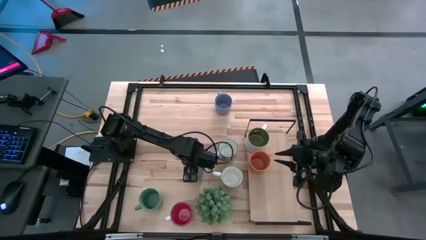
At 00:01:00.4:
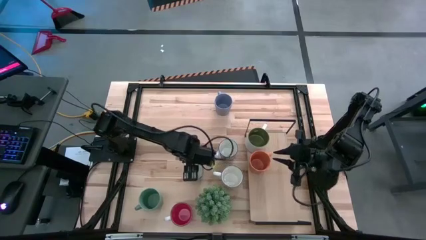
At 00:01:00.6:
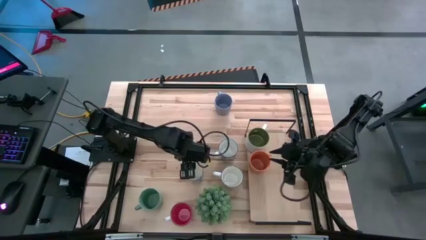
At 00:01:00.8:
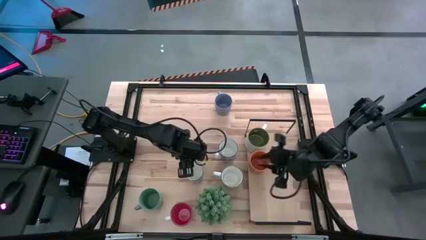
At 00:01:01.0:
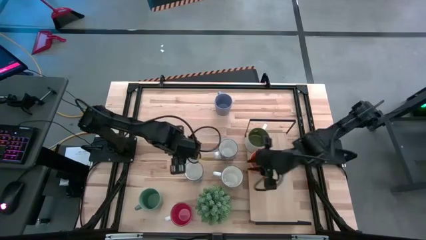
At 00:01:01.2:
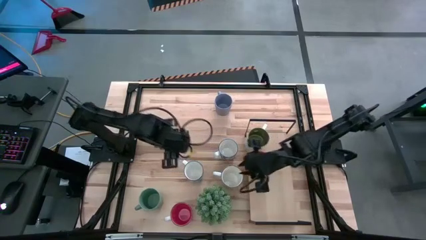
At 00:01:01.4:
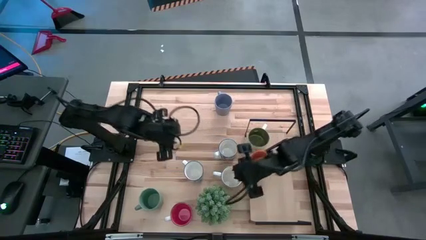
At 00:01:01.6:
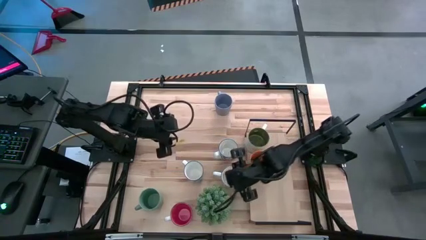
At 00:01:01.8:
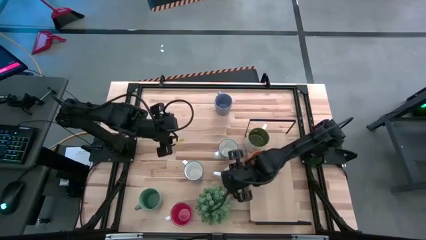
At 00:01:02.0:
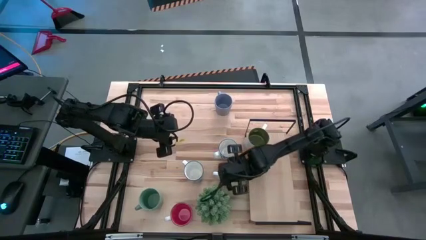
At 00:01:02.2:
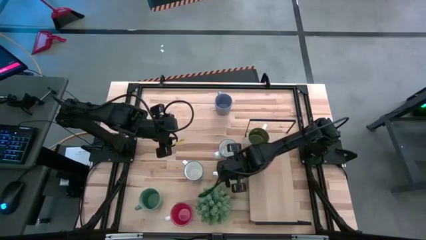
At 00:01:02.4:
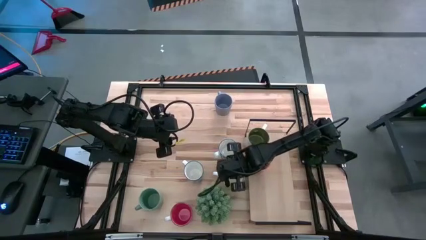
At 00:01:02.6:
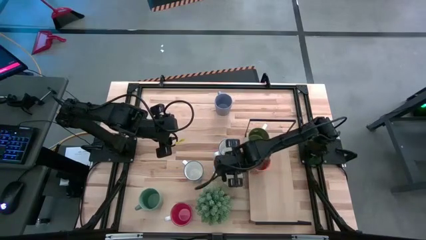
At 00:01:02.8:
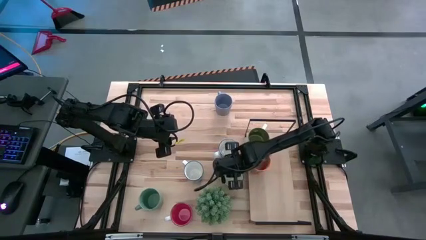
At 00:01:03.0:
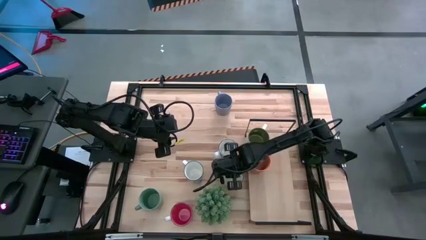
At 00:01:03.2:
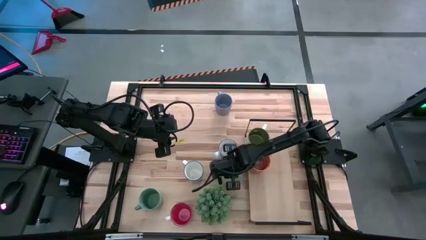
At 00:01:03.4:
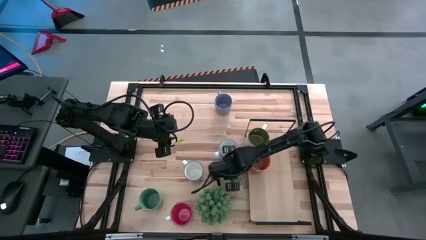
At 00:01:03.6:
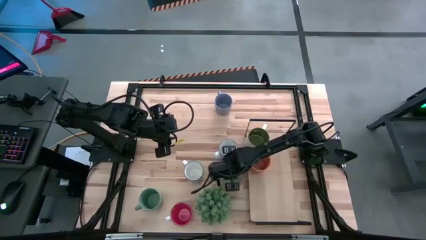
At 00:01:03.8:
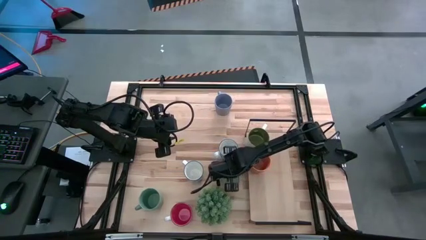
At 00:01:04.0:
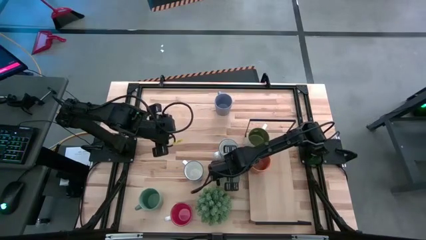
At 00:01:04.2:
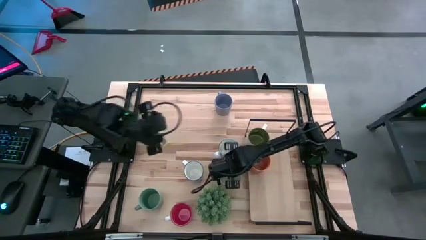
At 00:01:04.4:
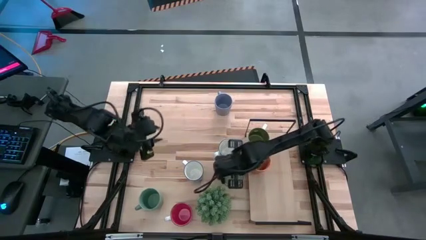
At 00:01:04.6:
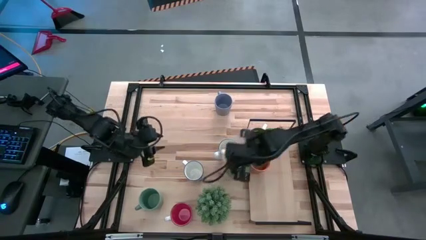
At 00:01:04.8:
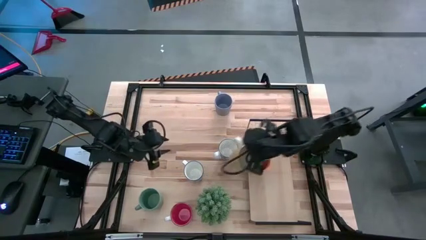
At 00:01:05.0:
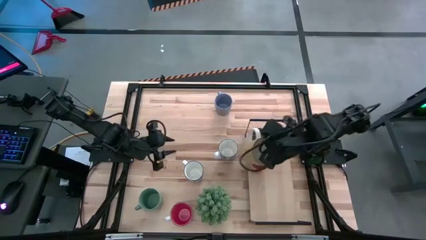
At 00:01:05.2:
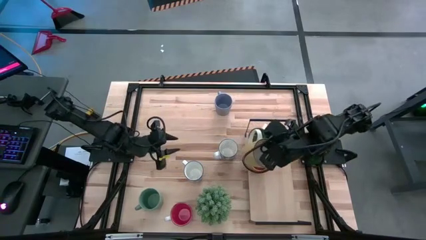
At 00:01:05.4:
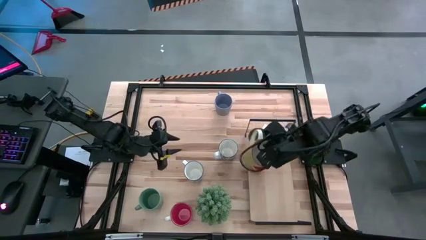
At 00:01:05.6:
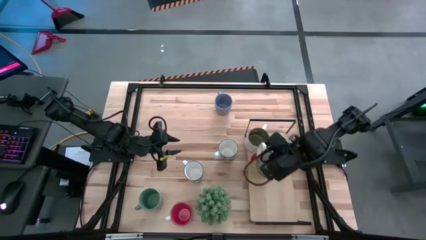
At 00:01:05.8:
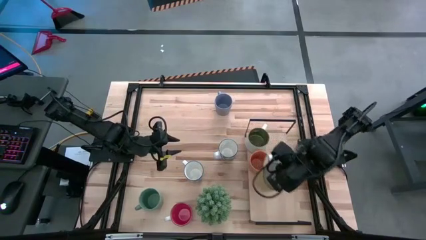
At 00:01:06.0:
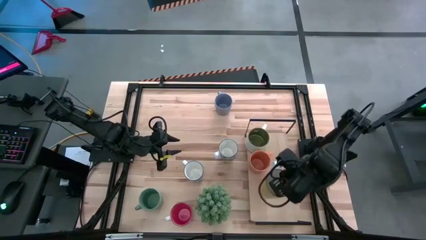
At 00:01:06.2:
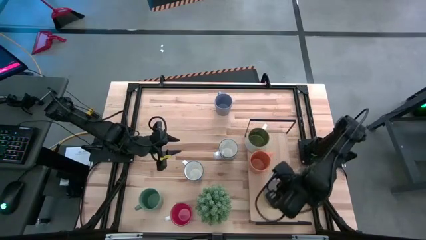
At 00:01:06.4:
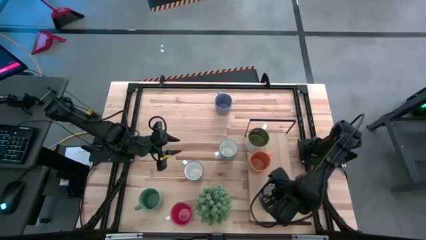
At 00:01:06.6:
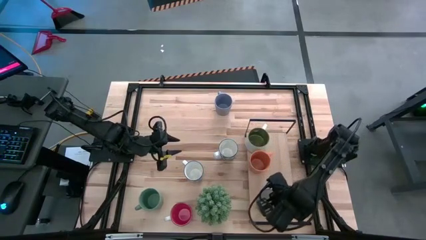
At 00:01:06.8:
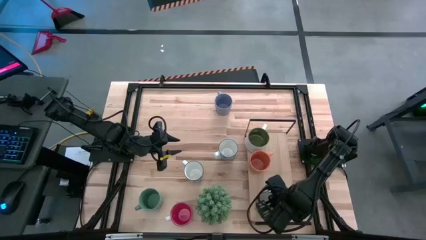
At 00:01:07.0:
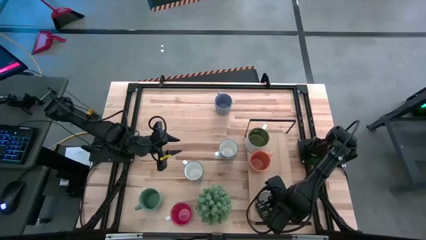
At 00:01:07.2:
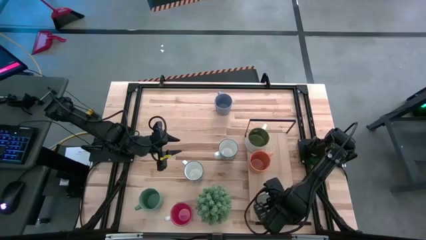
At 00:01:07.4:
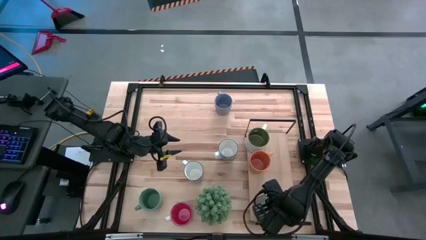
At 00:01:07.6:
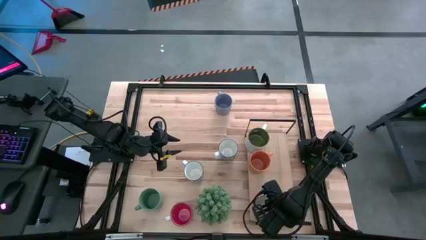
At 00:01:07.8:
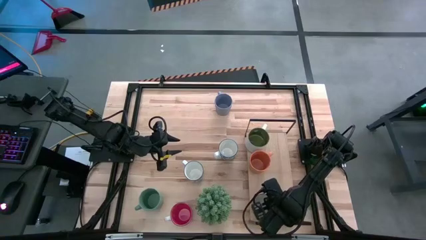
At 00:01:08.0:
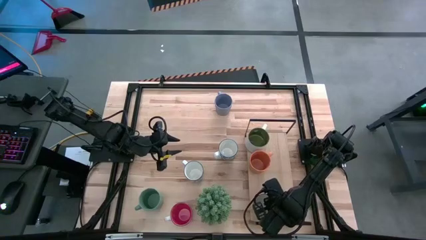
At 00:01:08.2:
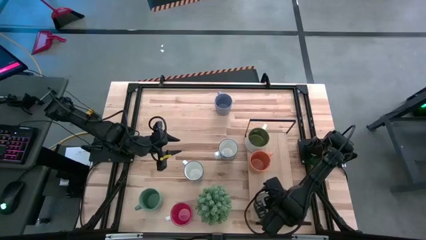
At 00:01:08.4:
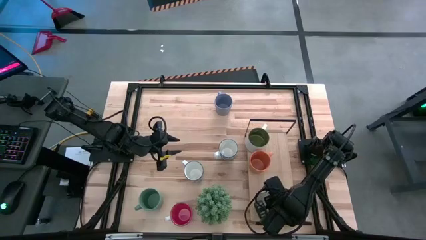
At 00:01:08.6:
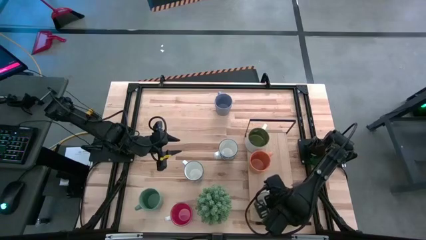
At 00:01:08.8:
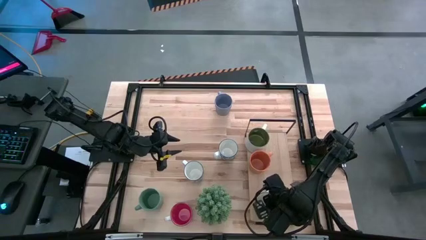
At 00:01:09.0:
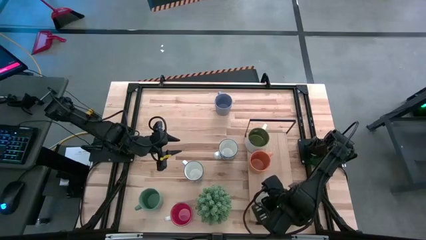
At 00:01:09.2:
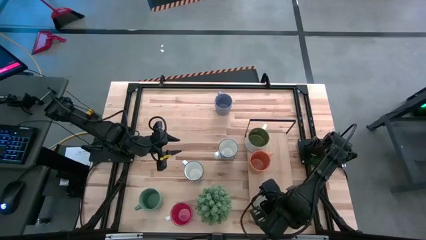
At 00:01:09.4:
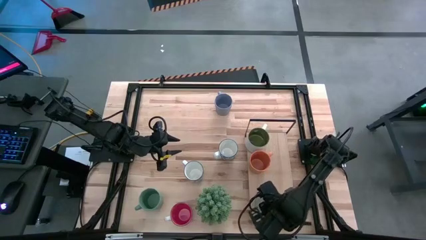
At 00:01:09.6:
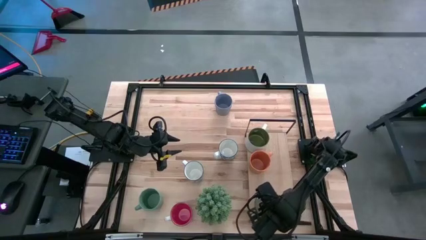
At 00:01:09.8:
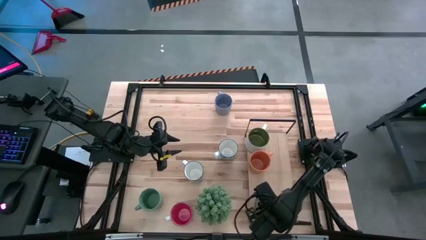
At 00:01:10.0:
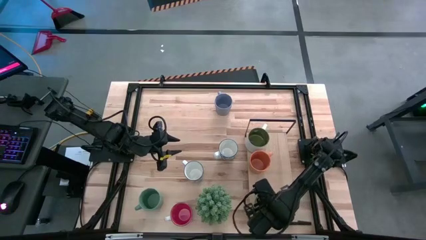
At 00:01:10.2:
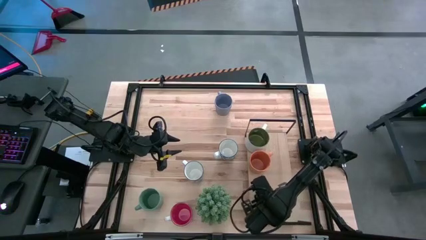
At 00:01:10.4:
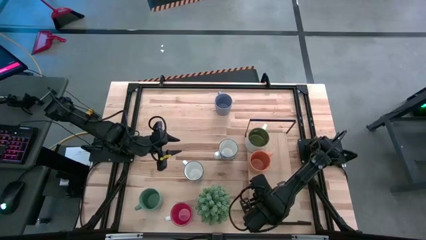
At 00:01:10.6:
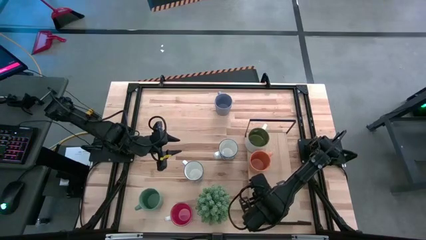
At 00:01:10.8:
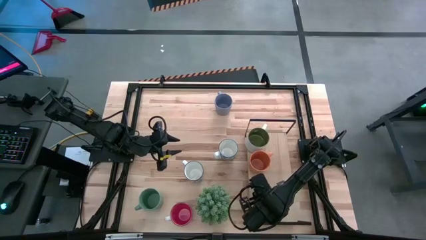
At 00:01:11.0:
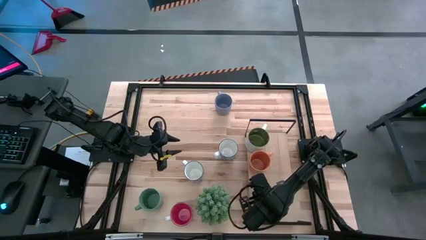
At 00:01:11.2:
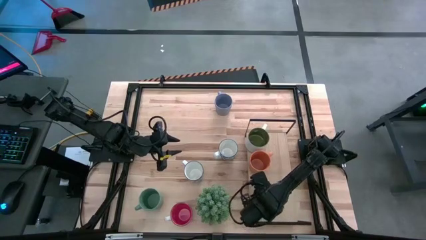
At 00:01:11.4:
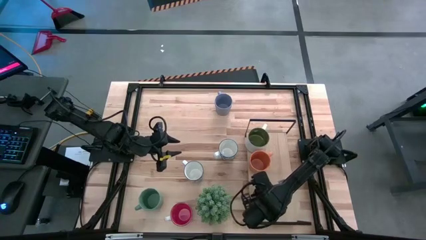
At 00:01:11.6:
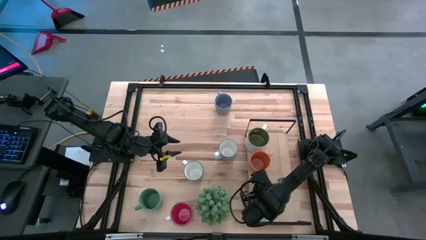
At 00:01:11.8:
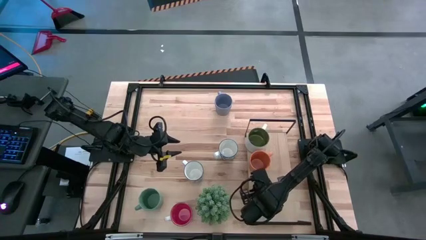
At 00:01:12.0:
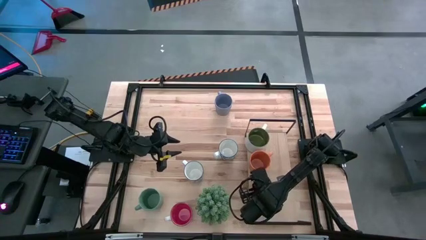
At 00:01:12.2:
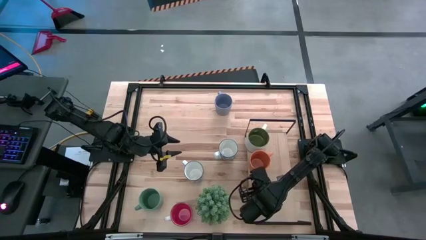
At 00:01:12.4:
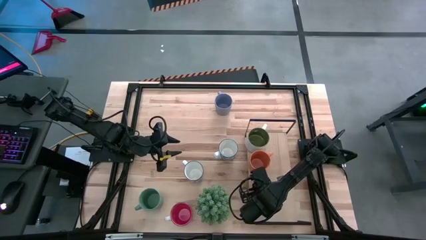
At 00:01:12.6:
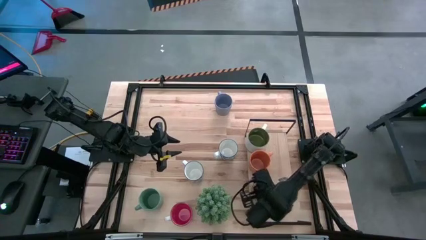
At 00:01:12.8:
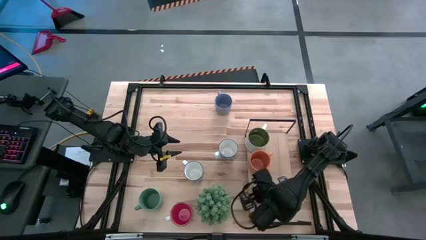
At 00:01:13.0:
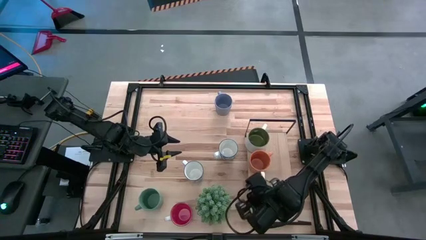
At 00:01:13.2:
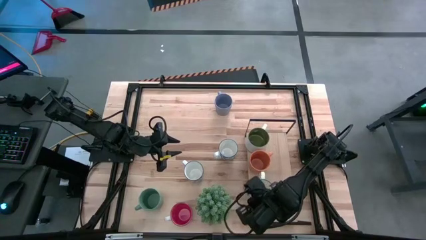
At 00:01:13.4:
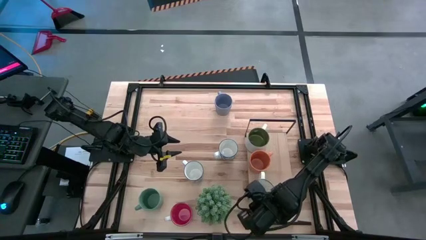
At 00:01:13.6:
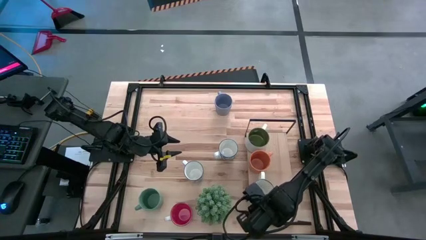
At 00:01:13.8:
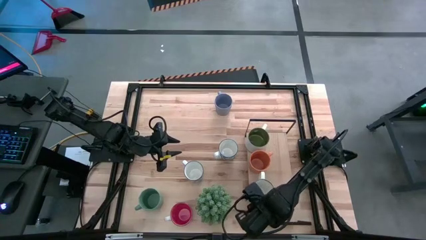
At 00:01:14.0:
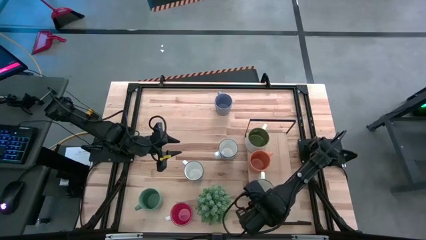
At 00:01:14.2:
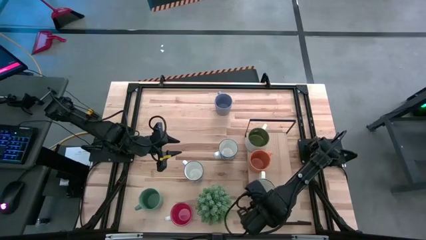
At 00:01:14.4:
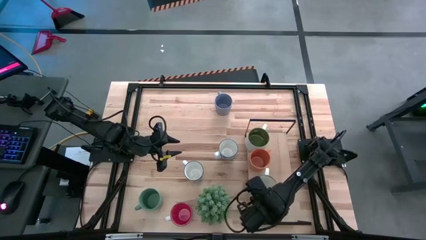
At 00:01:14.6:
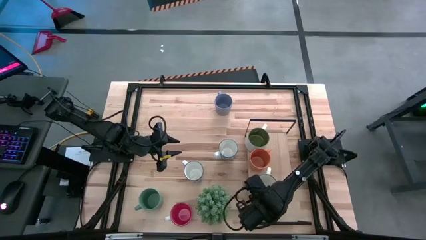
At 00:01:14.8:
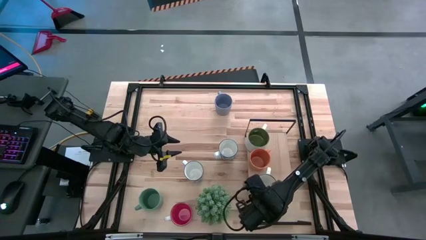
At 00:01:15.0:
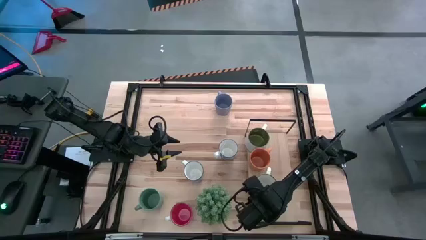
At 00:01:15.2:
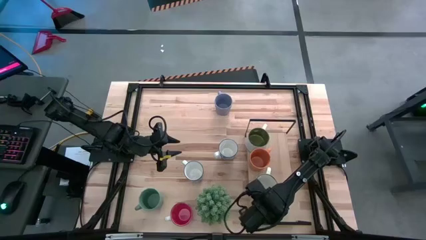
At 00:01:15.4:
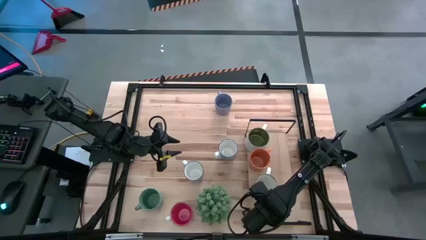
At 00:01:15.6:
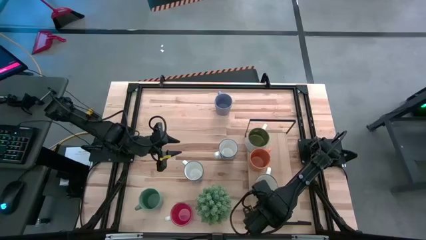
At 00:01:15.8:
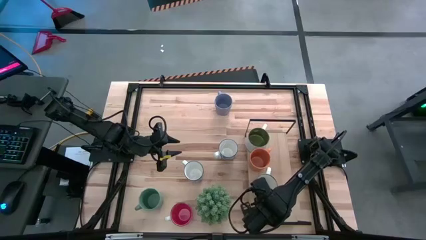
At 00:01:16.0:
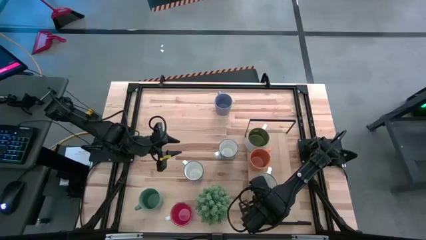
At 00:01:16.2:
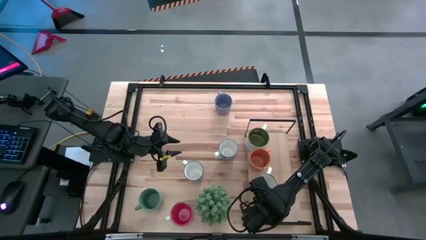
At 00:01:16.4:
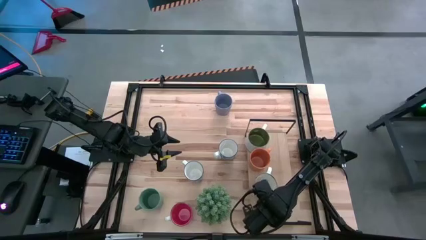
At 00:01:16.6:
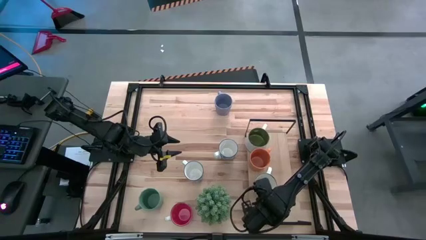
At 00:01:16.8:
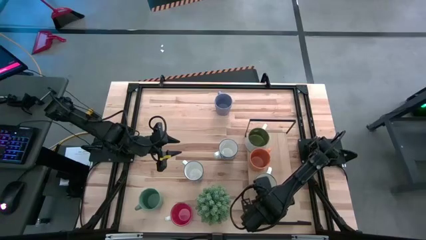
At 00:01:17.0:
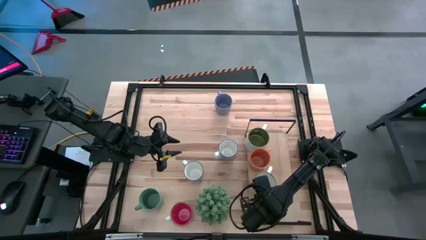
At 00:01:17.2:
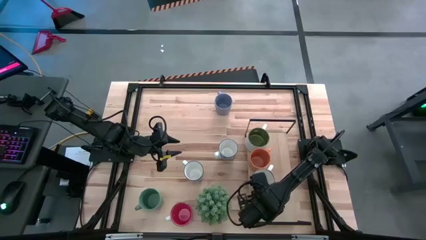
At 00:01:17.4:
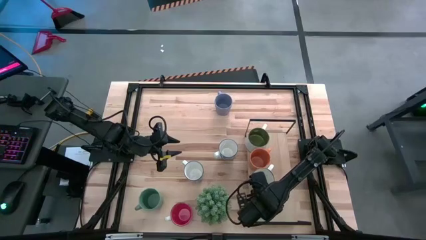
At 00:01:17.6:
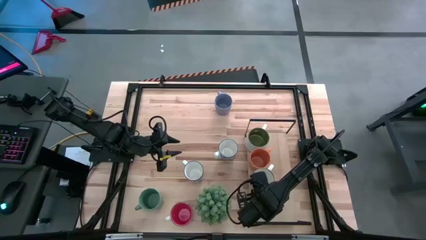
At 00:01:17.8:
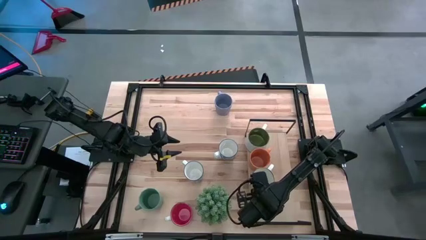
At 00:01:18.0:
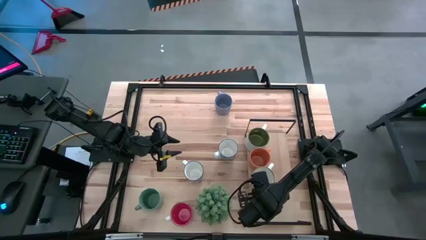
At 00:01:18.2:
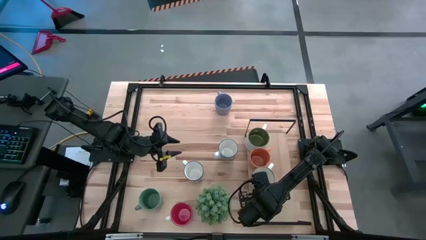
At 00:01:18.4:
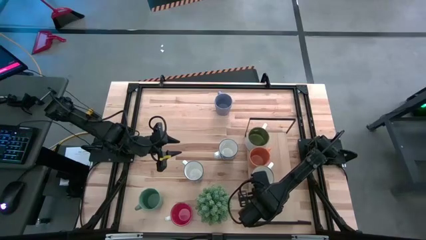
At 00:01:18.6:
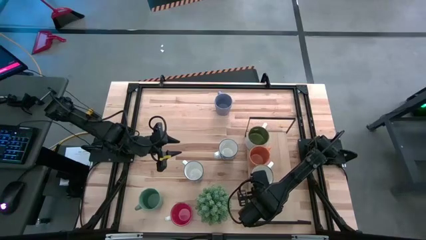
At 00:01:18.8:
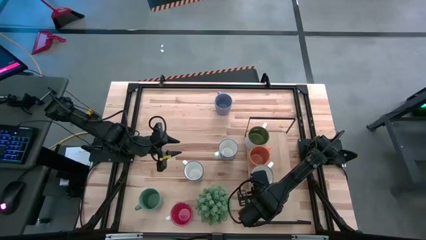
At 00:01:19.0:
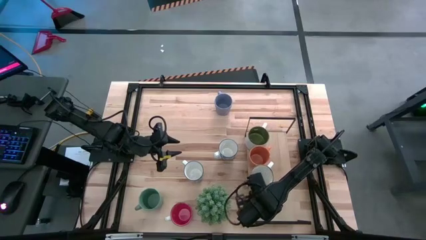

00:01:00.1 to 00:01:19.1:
Task: Place coffee mugs
Put the yellow mug on the shelf
